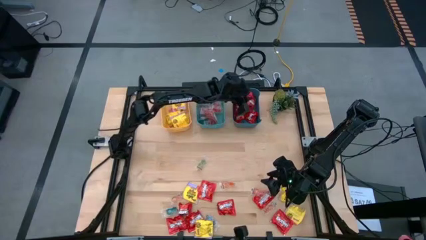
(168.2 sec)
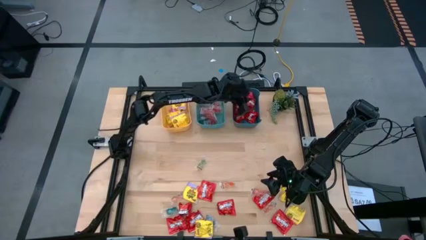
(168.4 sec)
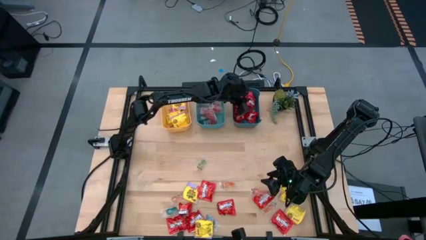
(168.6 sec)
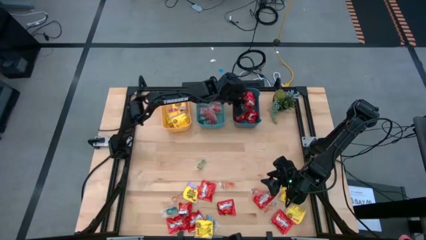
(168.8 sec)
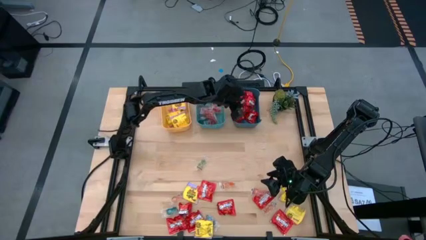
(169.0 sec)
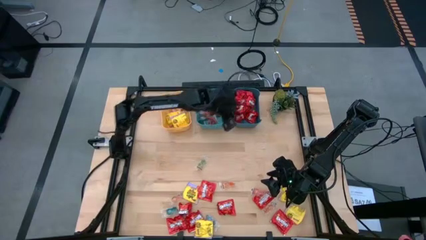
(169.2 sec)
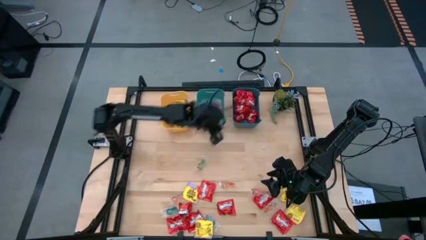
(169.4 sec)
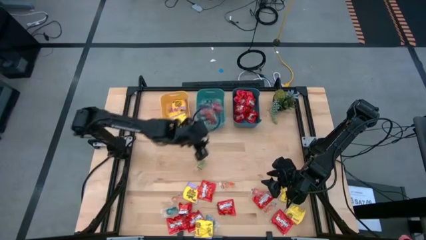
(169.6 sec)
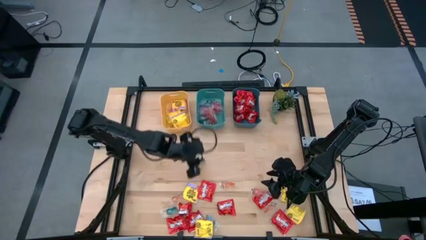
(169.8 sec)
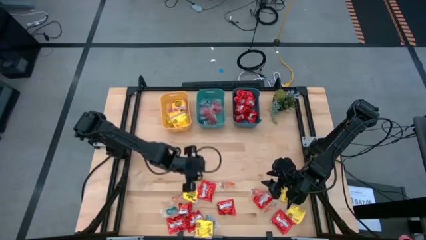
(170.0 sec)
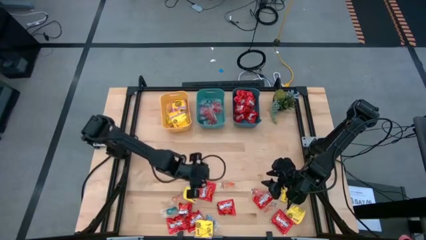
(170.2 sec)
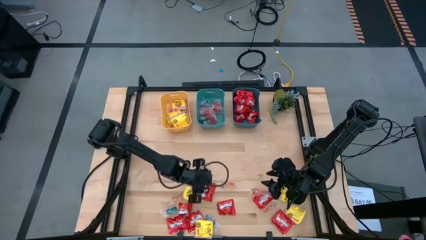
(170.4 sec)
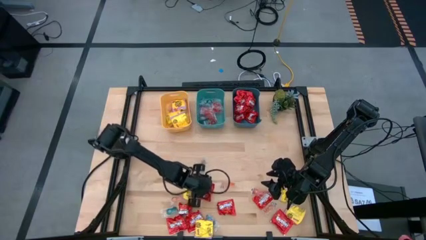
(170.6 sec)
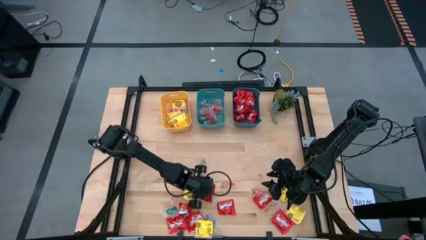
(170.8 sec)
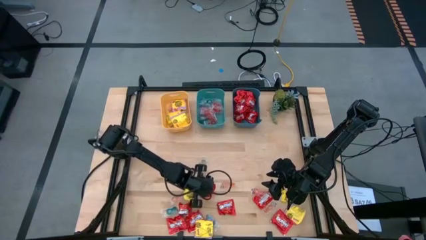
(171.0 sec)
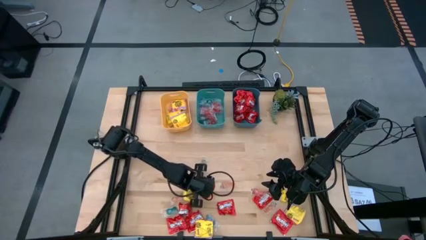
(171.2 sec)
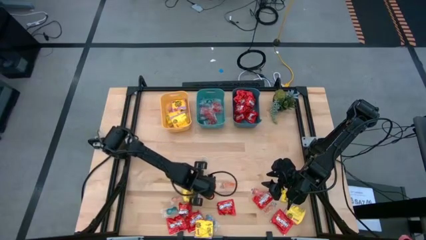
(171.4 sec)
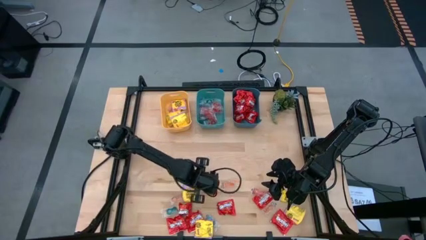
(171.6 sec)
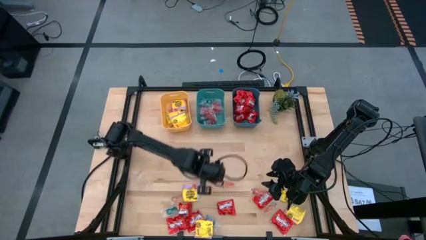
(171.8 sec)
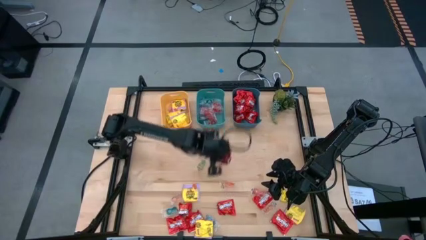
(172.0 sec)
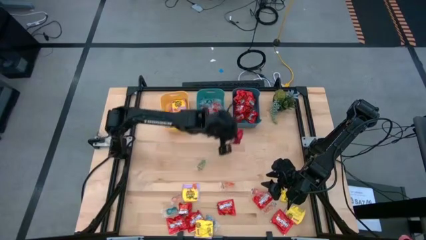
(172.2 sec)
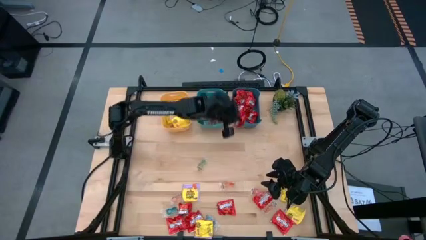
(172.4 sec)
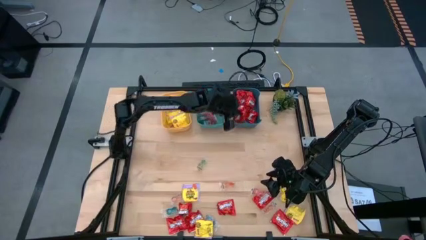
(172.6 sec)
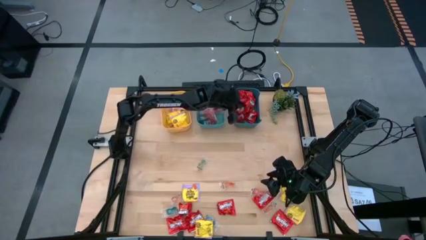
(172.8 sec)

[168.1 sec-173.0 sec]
Task: Sort candy
Put the red candy into the blue bin

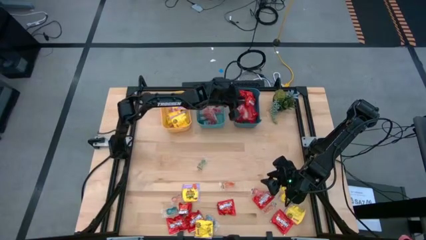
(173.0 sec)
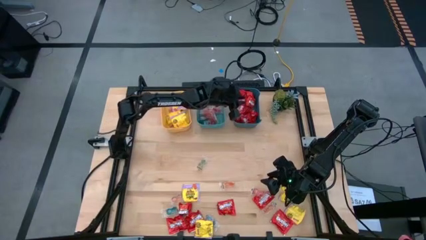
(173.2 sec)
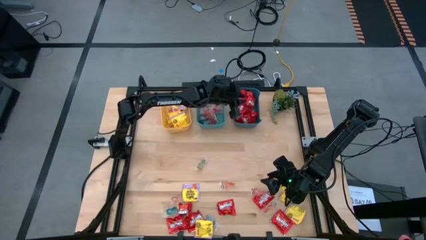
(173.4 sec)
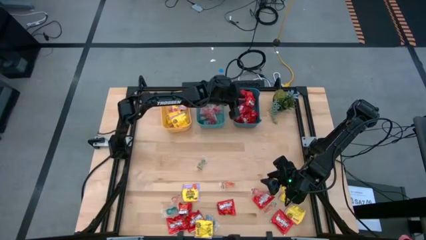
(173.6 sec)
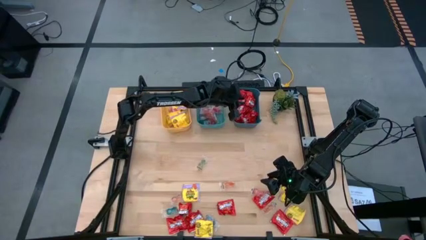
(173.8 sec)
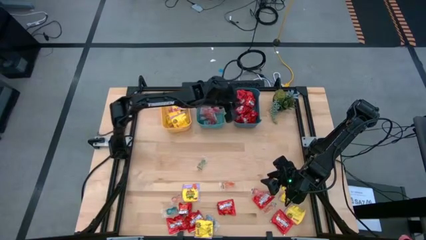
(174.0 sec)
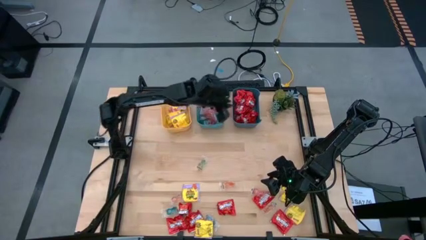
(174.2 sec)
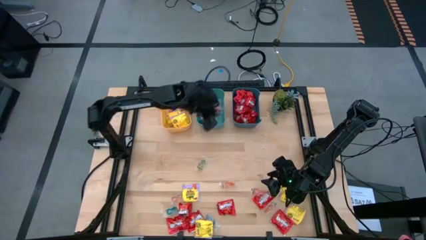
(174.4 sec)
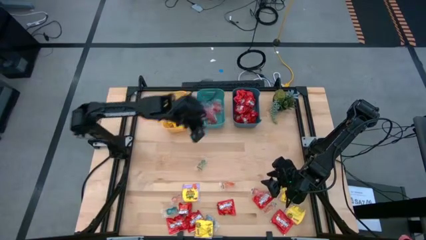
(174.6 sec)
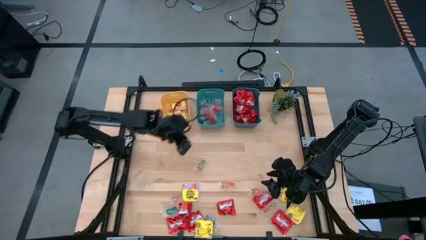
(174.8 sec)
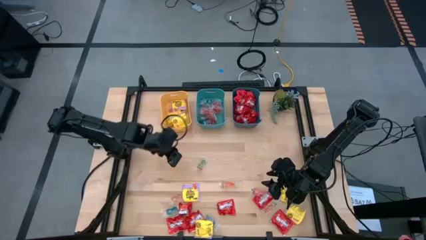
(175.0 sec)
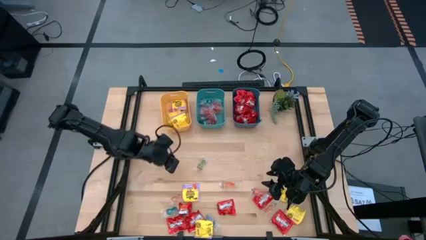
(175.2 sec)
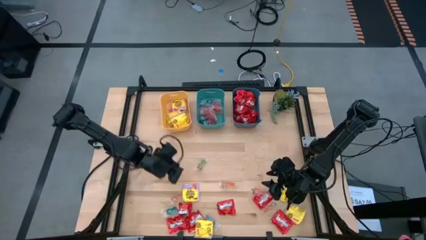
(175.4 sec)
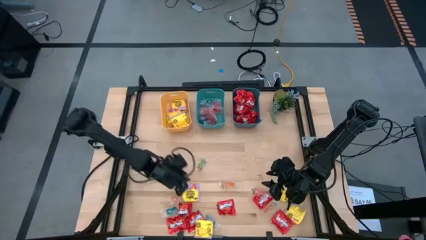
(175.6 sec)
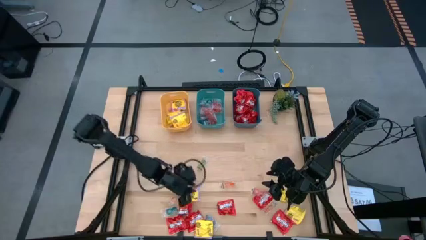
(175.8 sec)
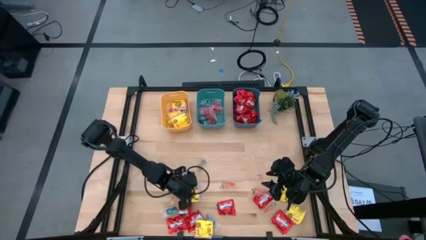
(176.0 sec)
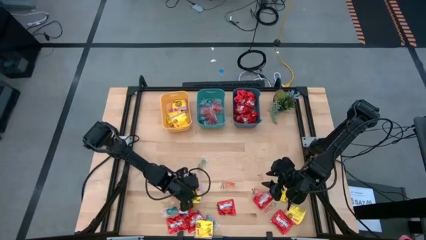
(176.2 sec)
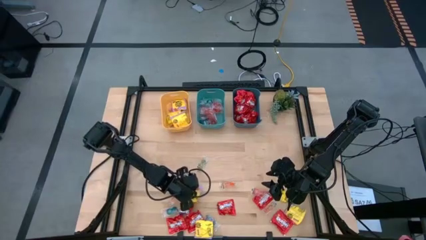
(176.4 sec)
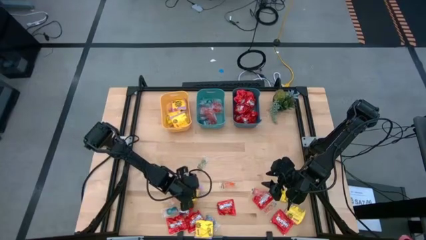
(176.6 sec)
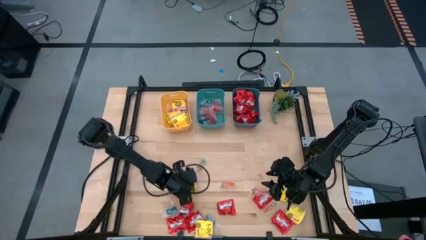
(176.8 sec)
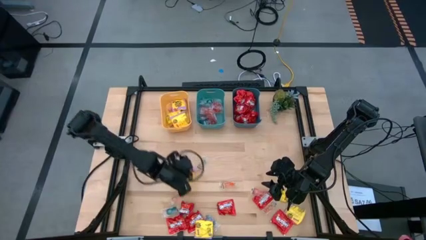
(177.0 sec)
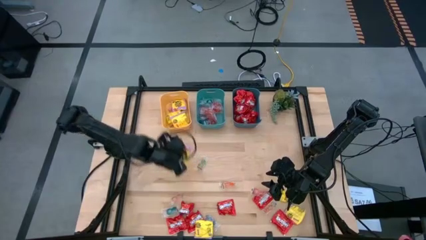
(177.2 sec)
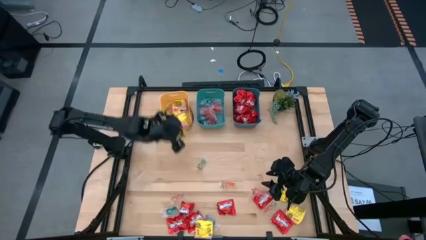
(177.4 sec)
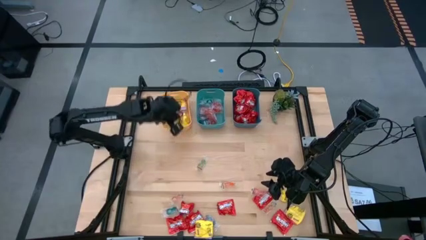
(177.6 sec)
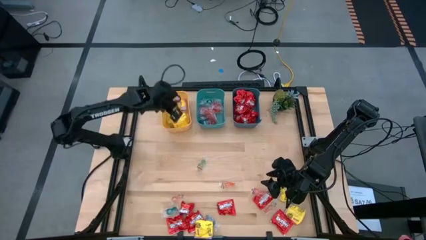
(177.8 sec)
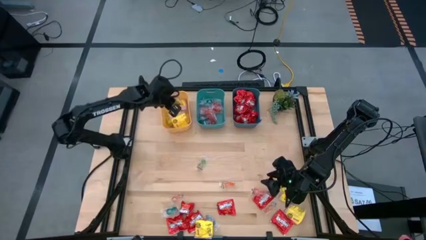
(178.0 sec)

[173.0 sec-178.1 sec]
Put the yellow candy into the yellow bin

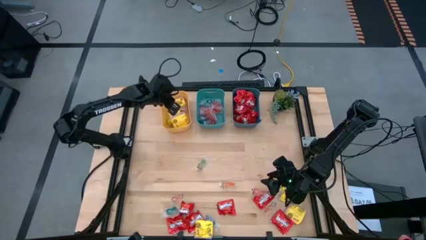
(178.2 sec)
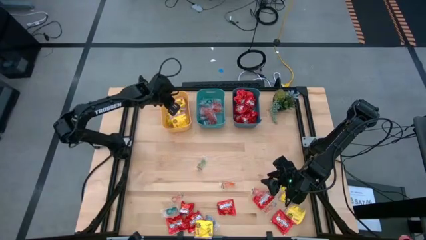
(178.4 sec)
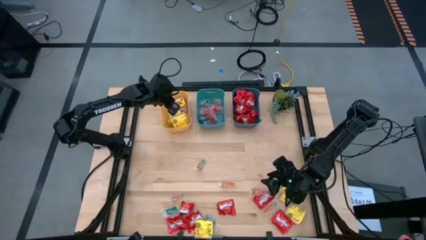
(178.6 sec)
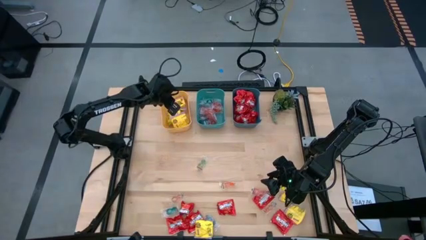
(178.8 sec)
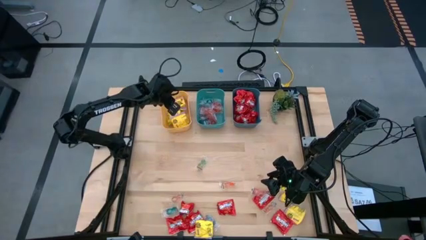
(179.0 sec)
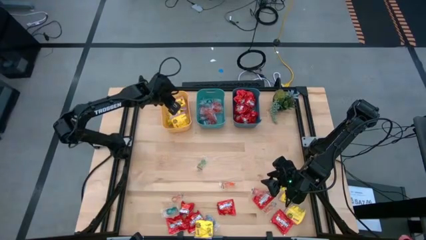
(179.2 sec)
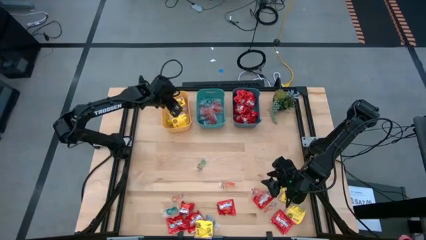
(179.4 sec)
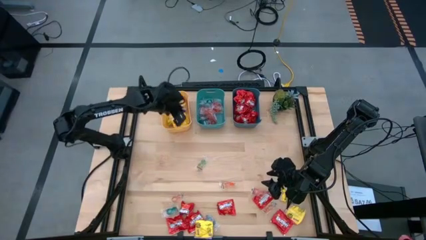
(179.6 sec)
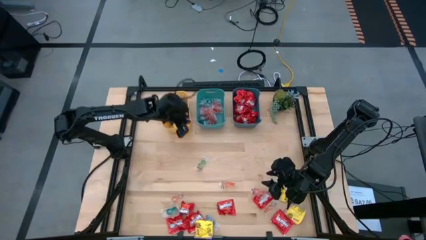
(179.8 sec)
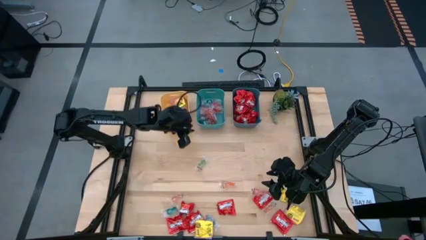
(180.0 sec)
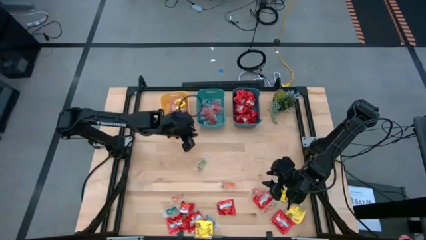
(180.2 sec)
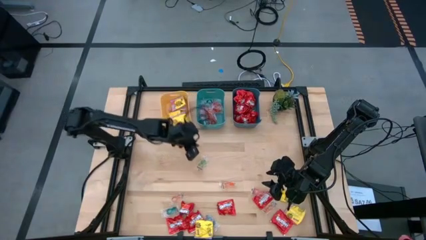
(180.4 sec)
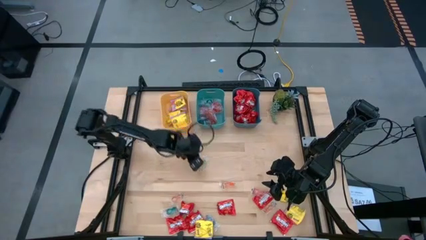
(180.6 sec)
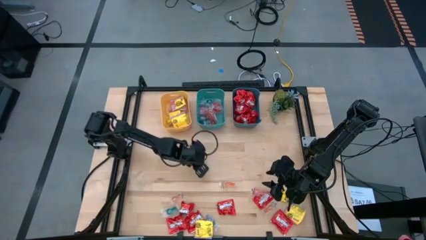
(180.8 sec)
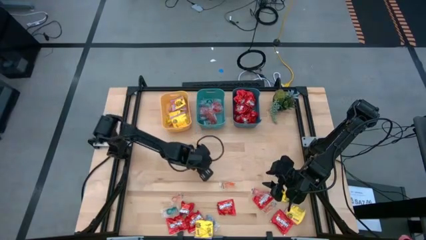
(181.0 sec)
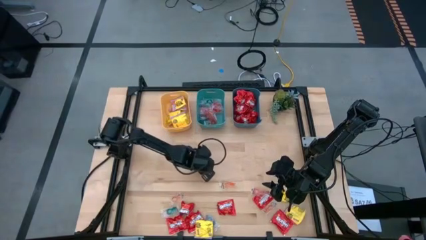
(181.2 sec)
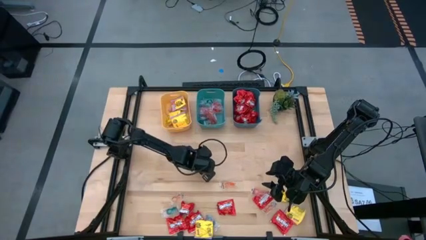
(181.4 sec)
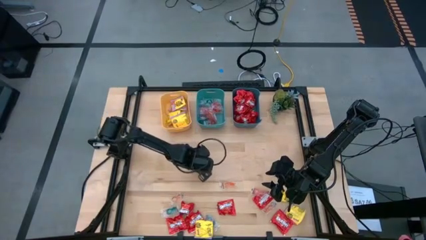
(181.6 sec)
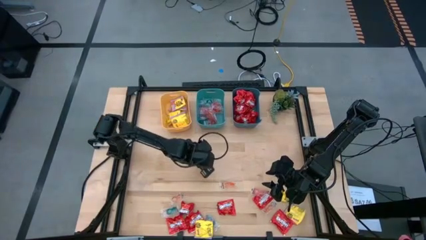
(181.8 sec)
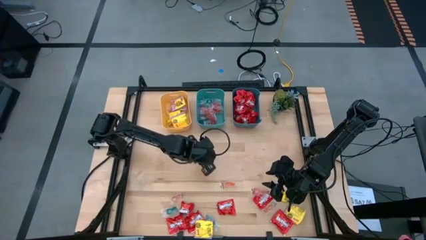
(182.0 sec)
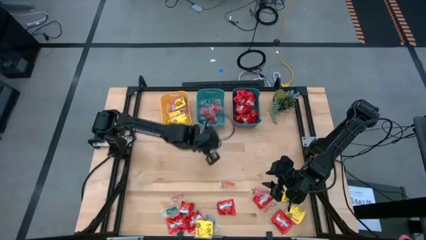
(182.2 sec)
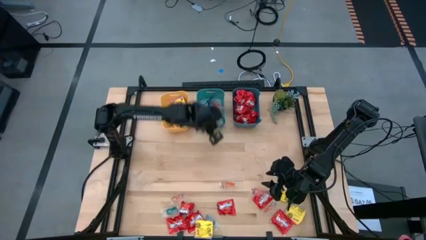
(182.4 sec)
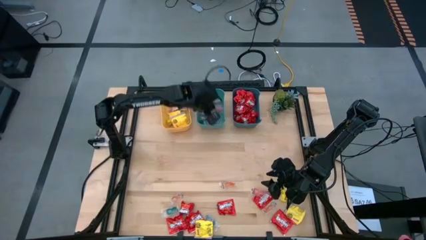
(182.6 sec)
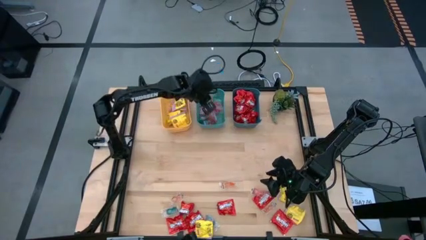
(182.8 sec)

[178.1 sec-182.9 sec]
Put the green gummy candy into the green bin
